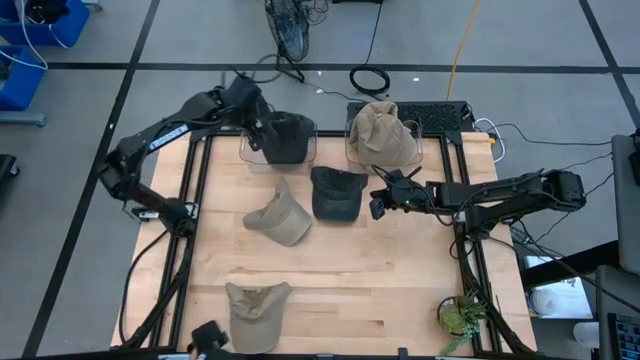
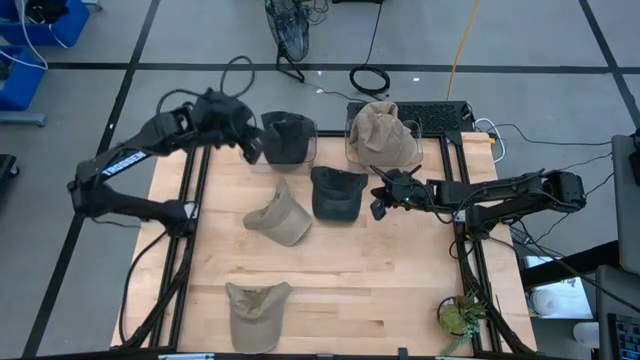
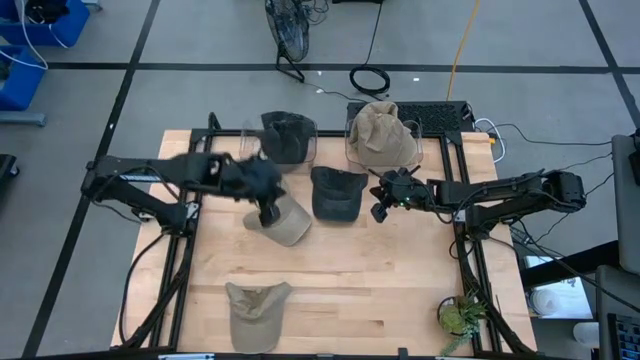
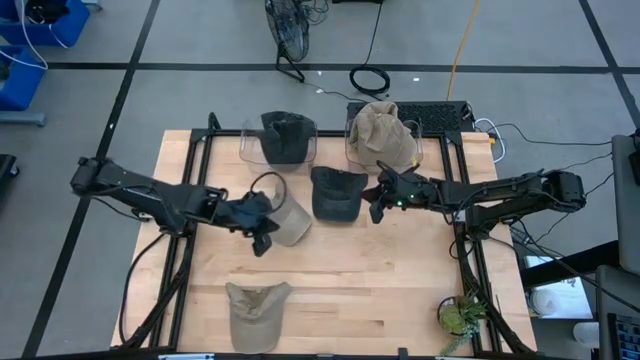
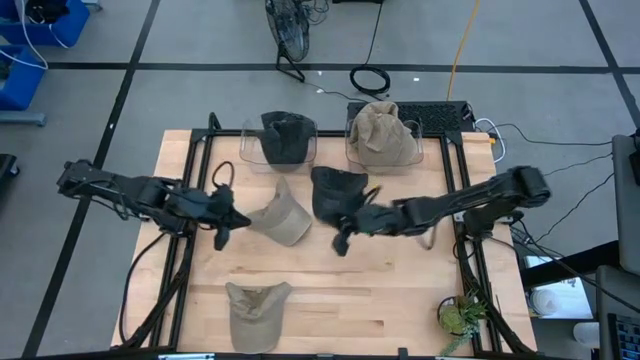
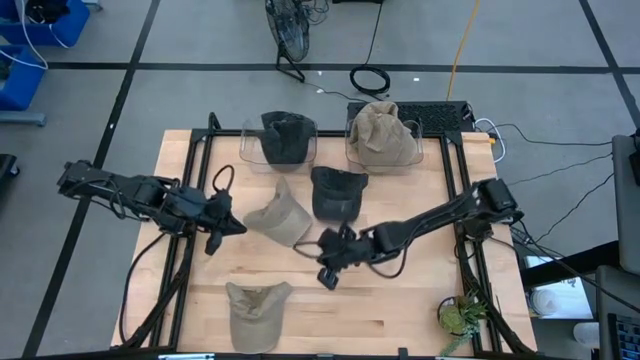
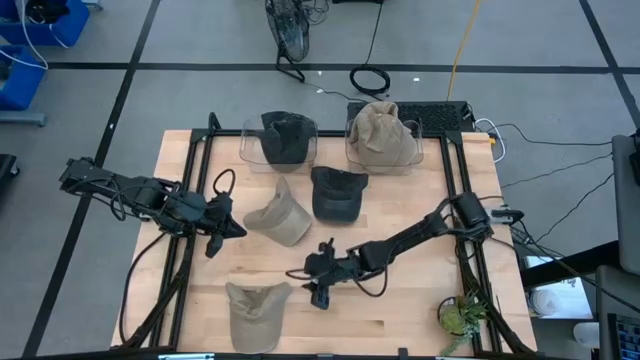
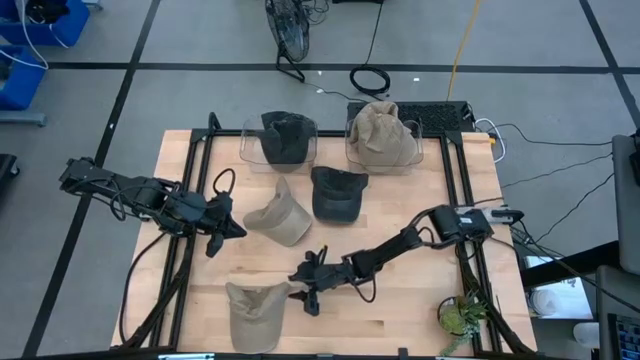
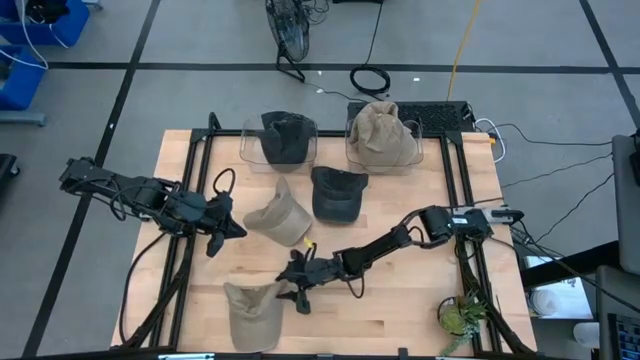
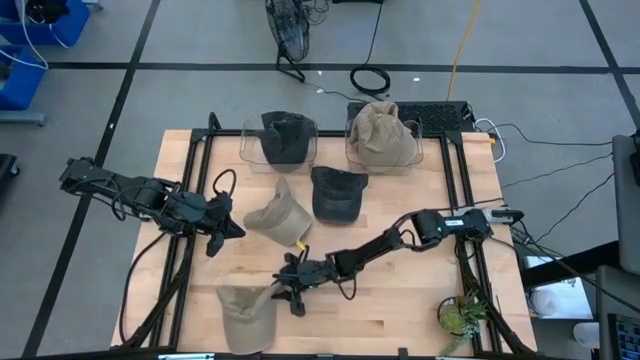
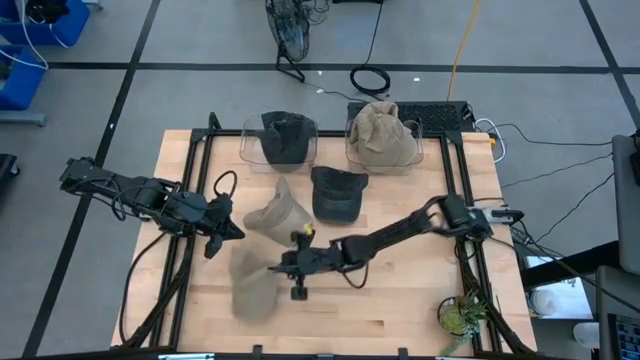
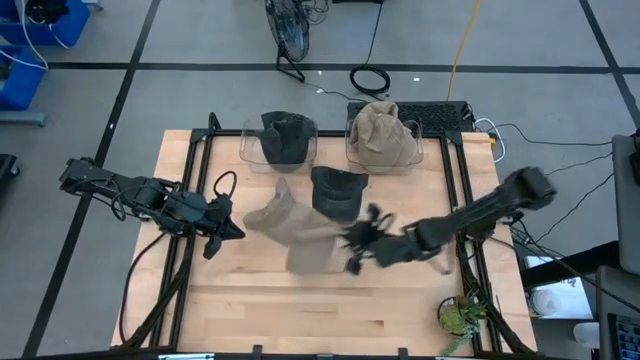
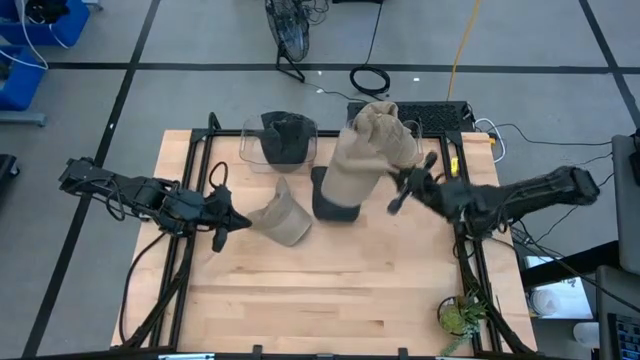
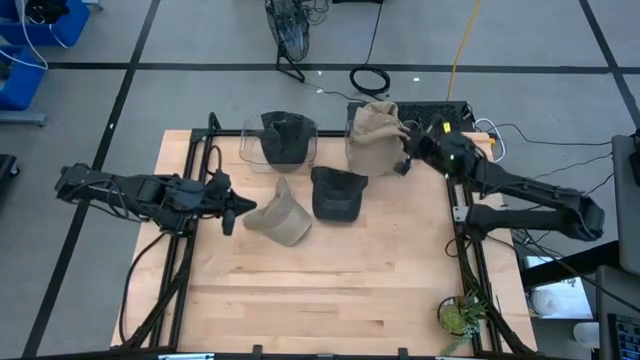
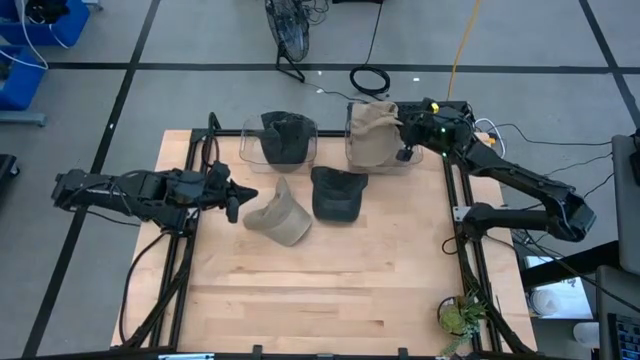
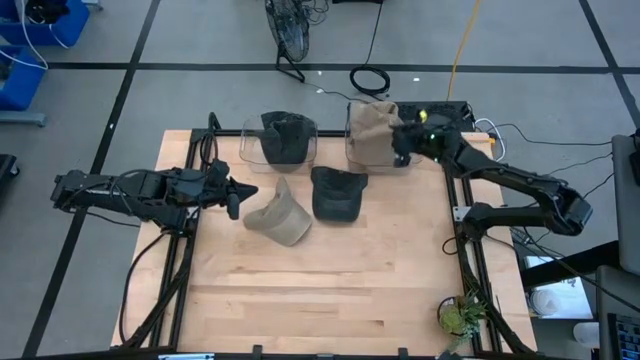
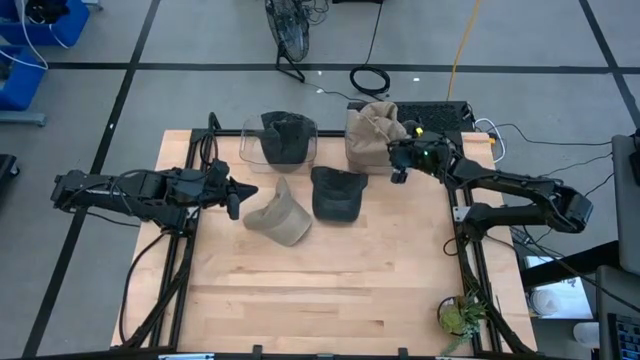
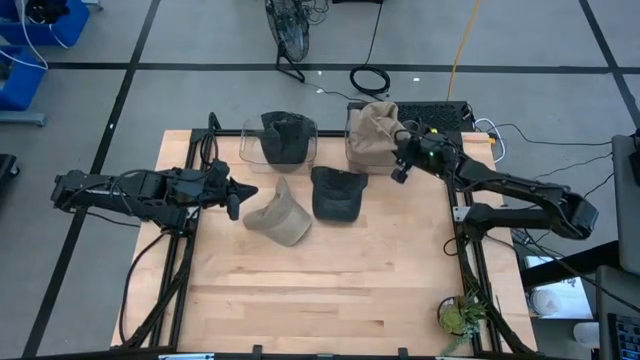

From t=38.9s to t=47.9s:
Task: Pick & Place hat
Put the brown cap into the right transparent bin

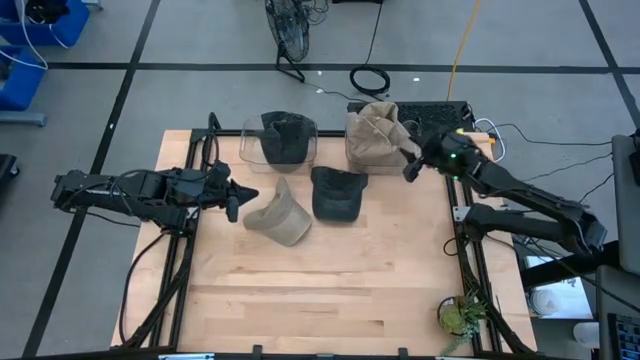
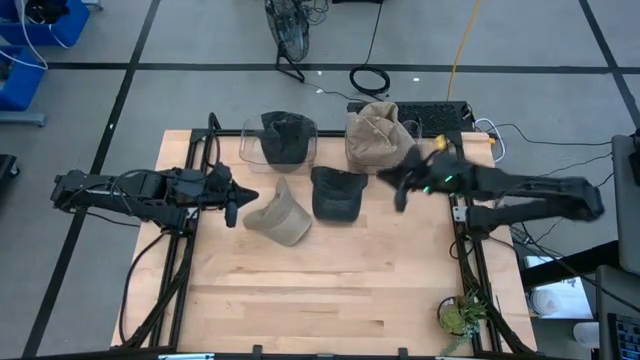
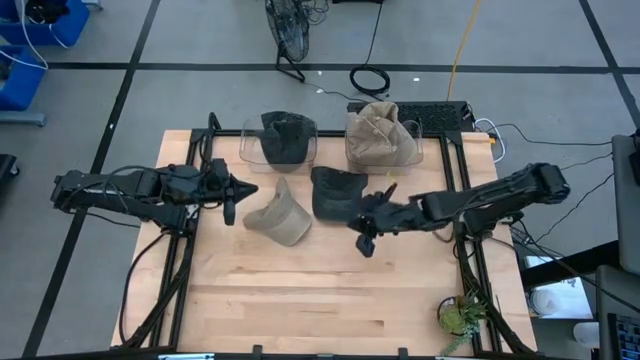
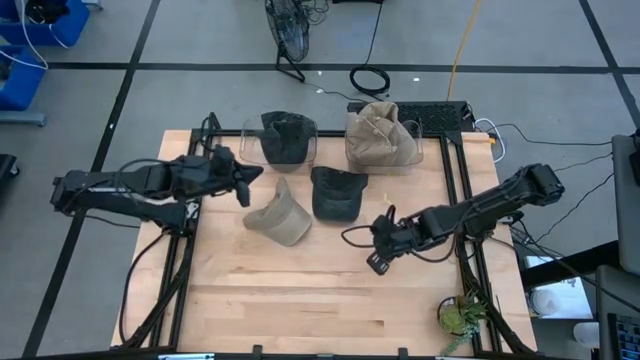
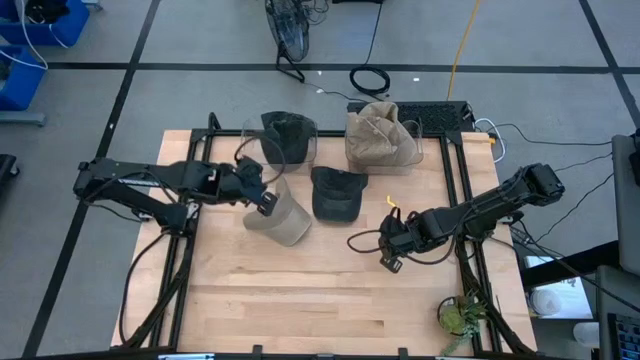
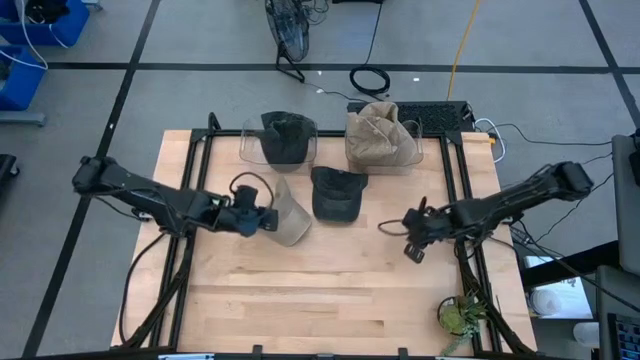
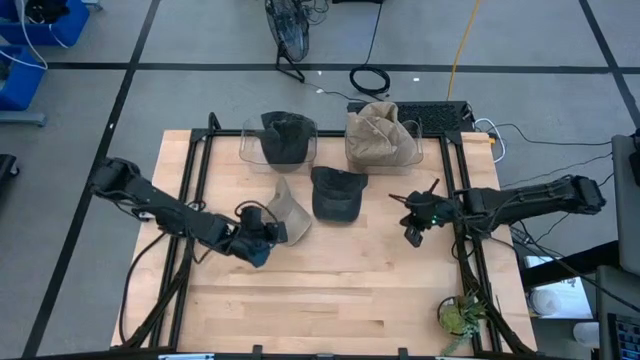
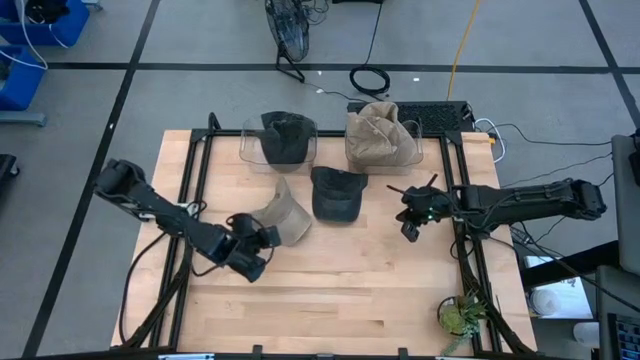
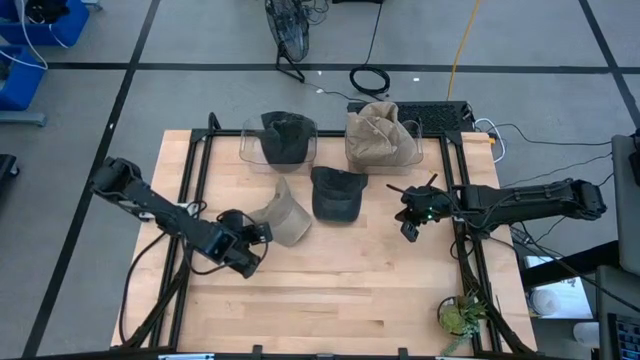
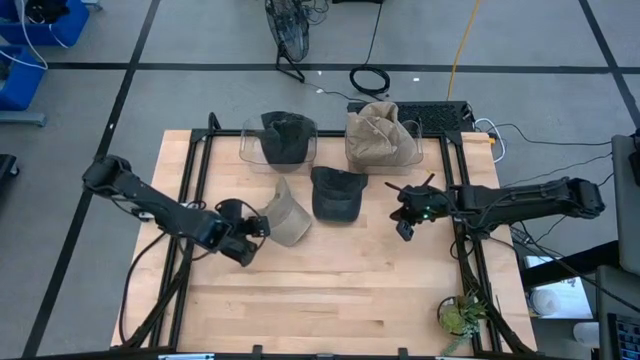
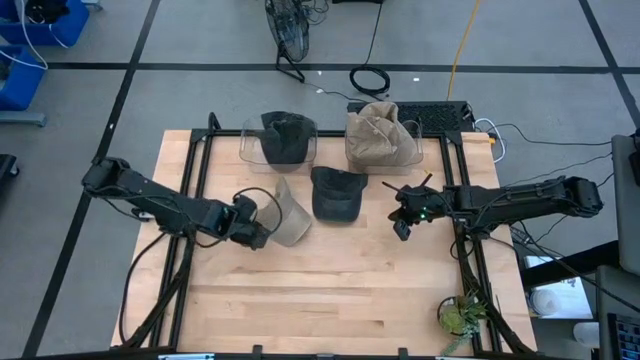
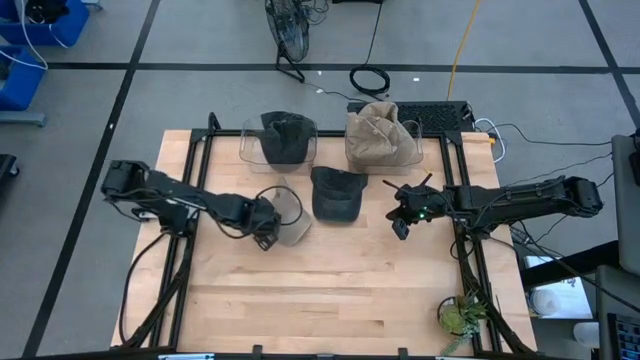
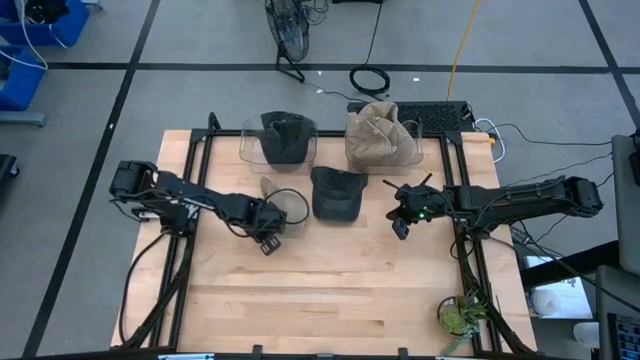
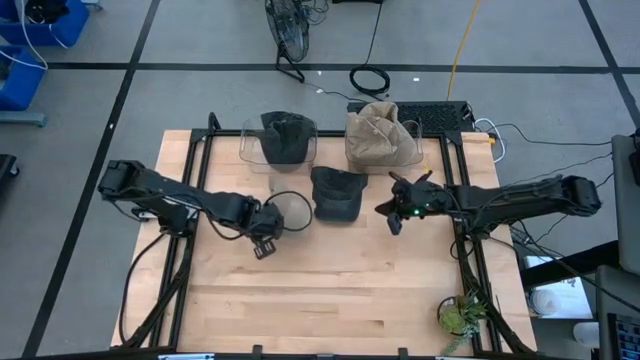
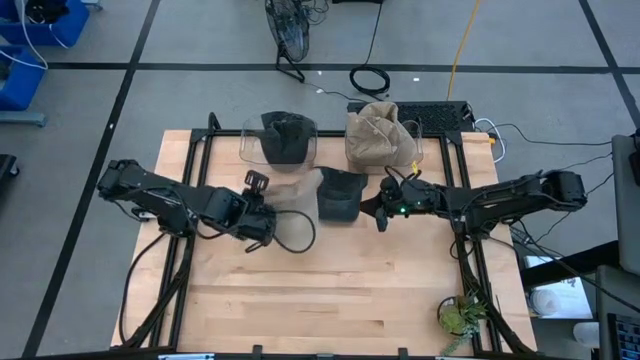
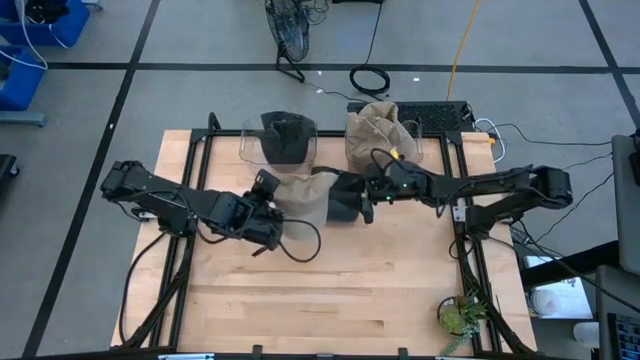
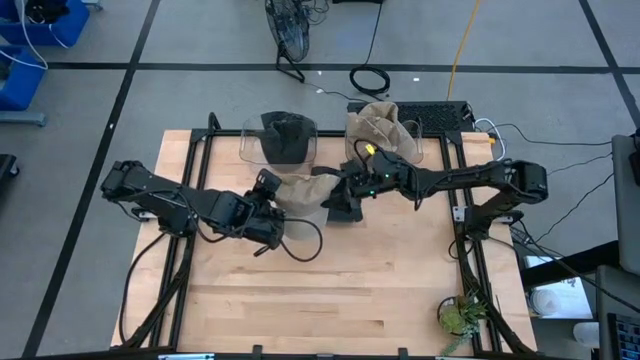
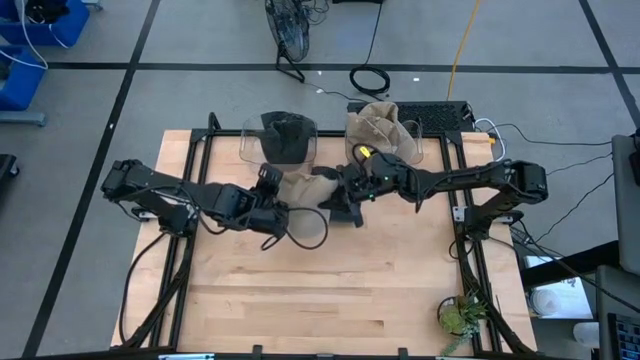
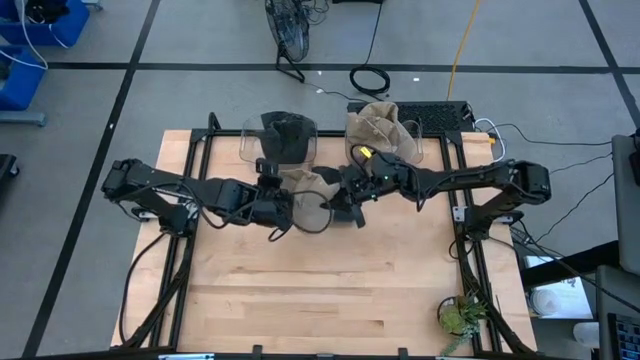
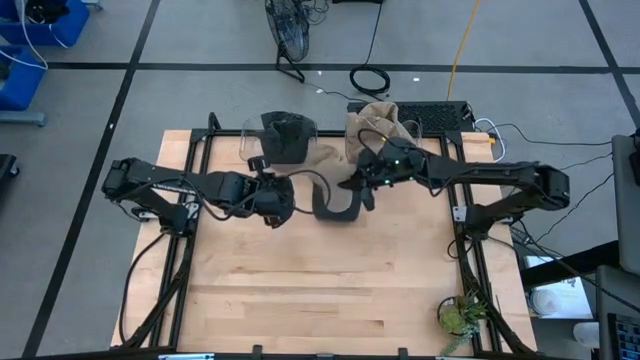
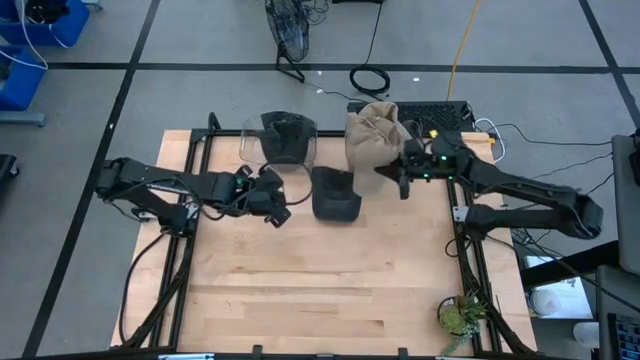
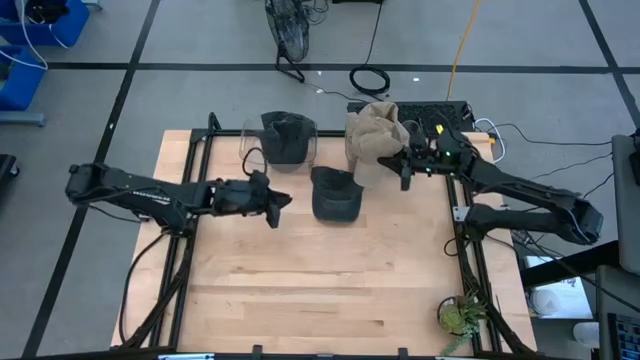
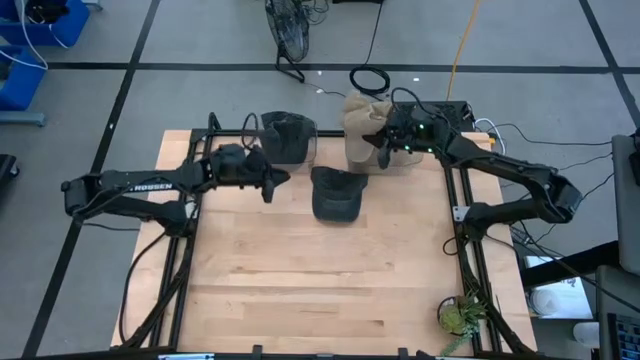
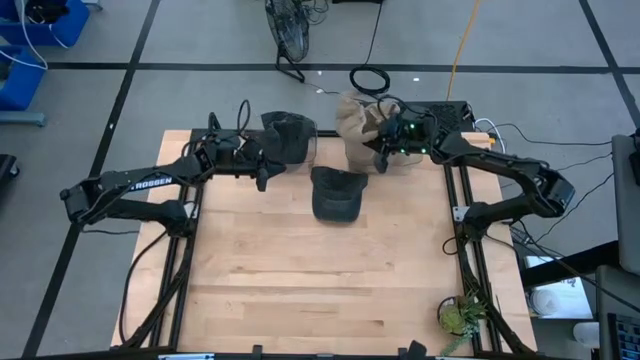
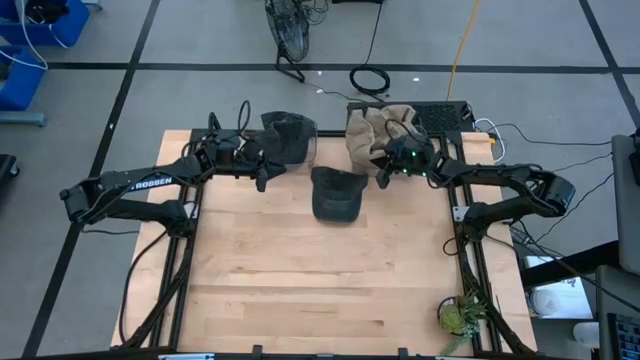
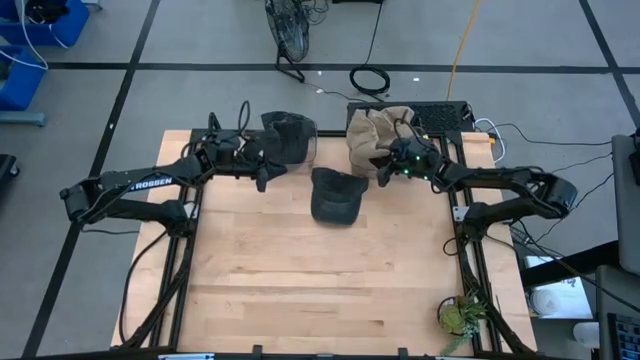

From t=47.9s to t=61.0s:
Put the brown cap into the right transparent bin
